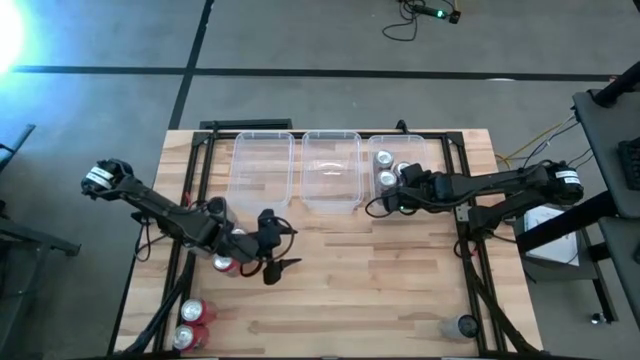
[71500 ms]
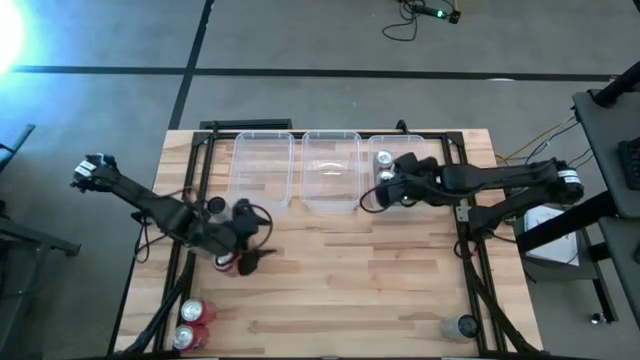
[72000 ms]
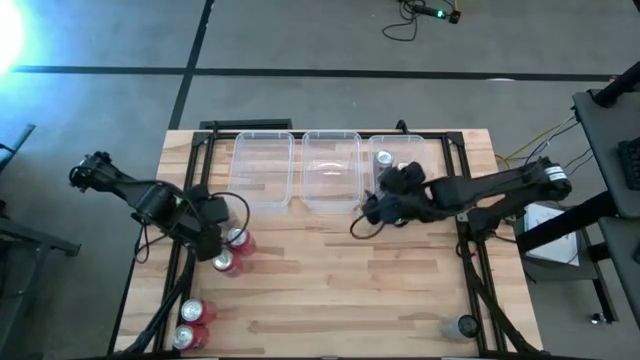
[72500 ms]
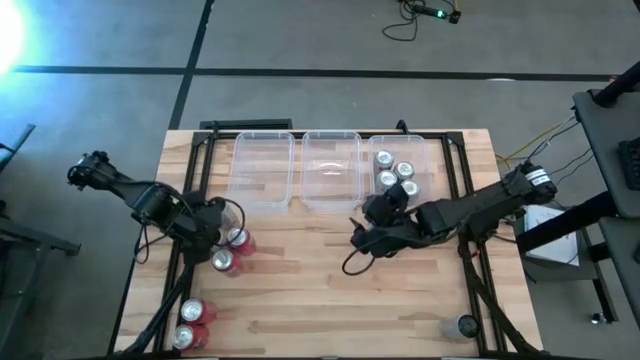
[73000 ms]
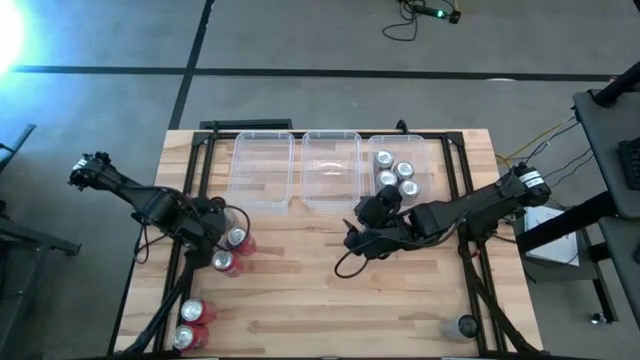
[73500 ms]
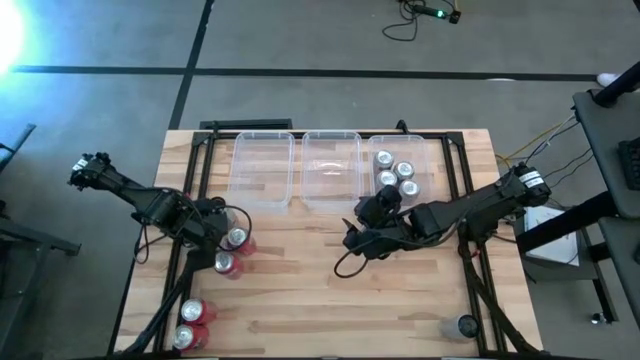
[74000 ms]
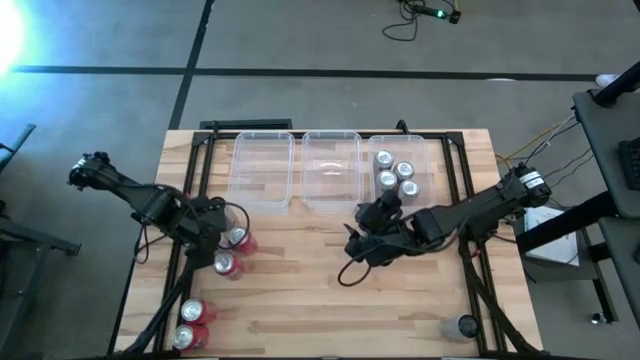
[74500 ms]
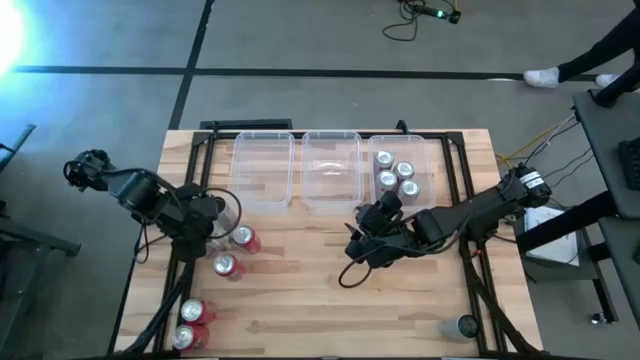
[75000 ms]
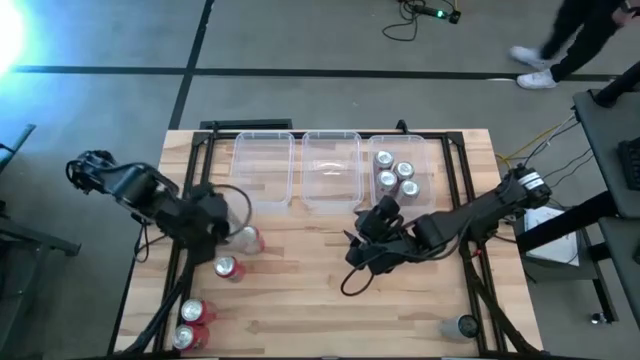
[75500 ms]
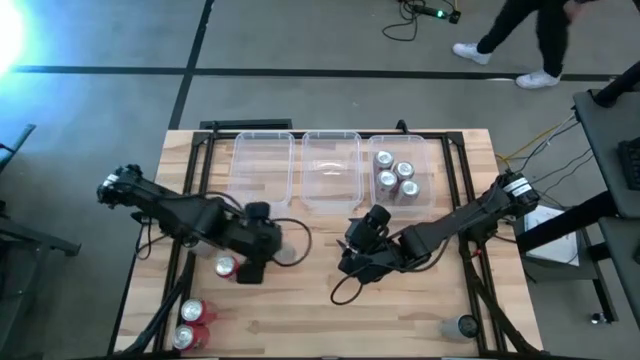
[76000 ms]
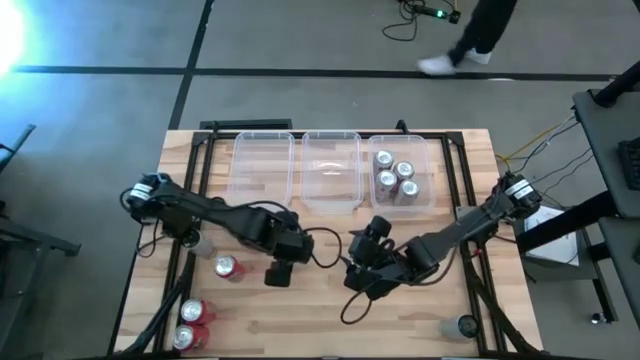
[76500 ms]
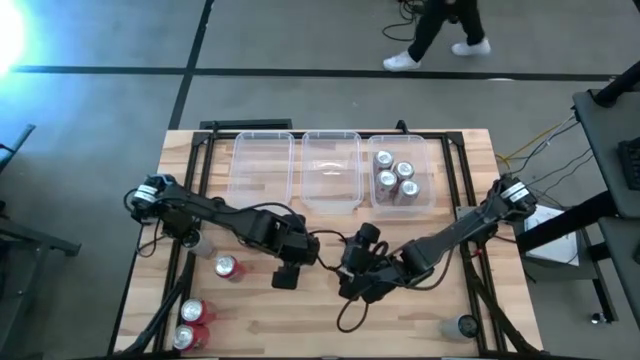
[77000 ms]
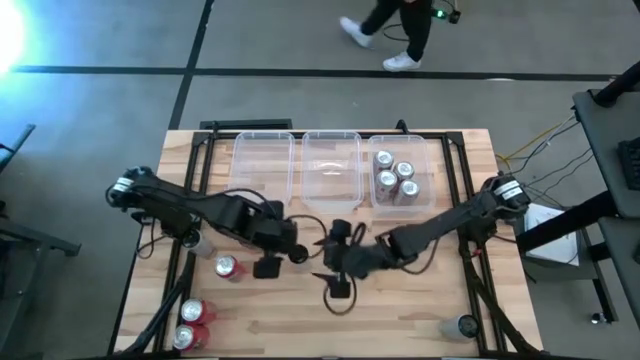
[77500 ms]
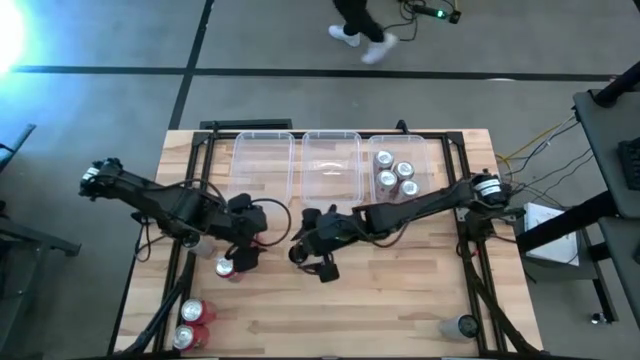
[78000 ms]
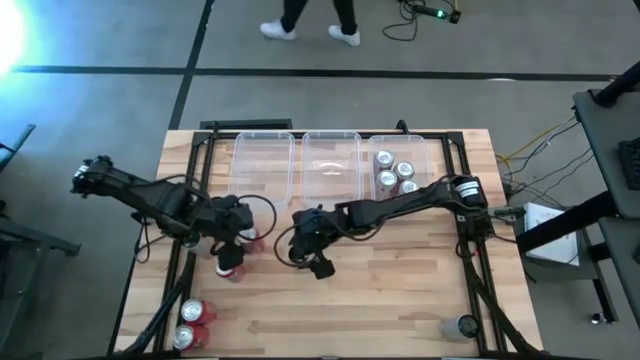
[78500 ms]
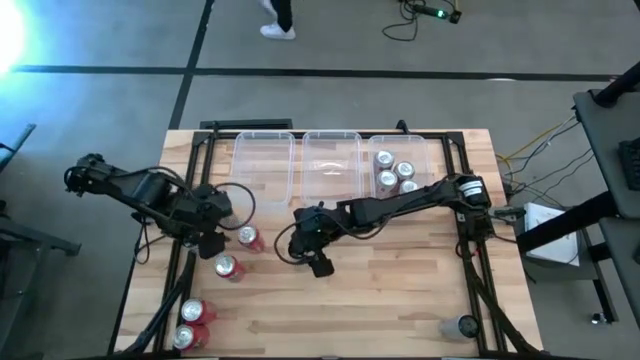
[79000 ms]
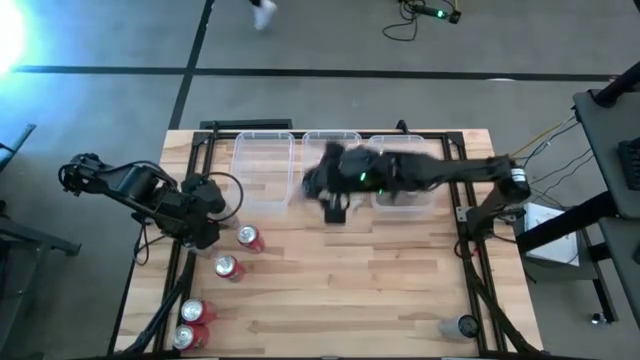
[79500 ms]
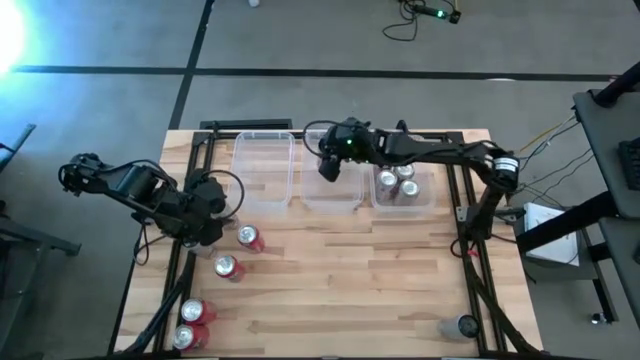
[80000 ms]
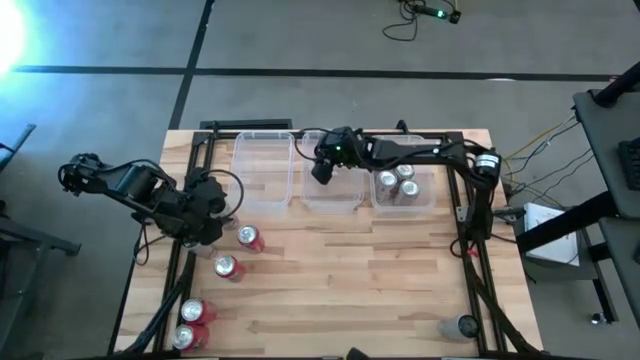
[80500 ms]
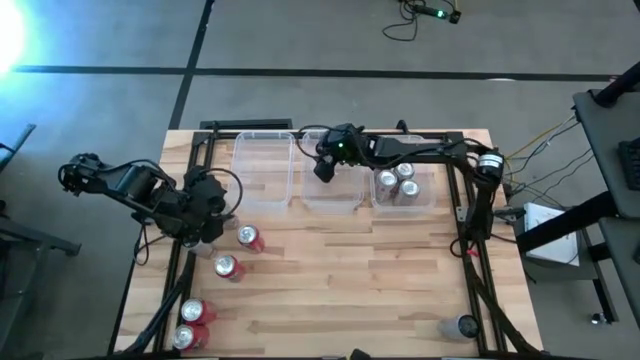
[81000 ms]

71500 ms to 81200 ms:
Task: Sort soda cans
Put the white-pink soda can into the middle transparent bin

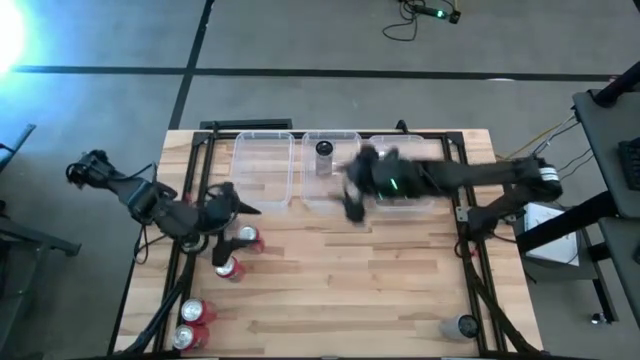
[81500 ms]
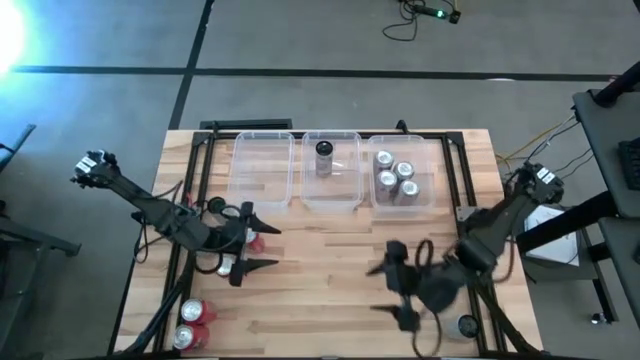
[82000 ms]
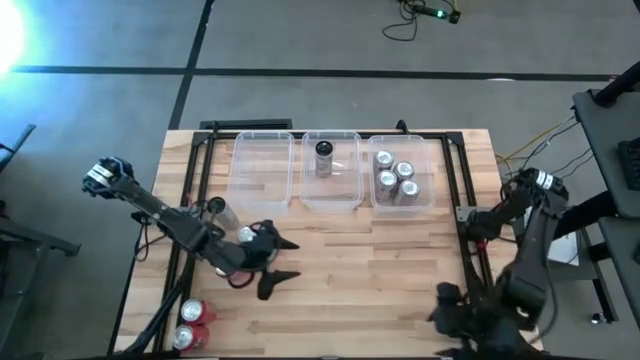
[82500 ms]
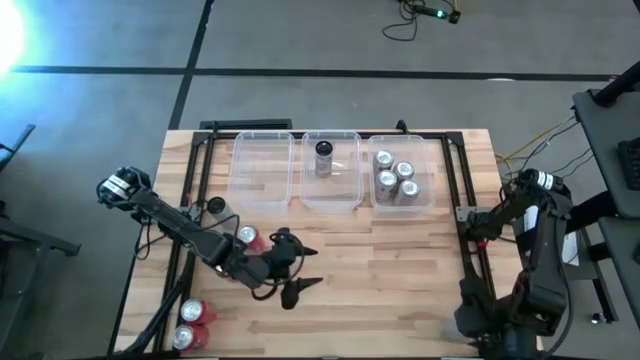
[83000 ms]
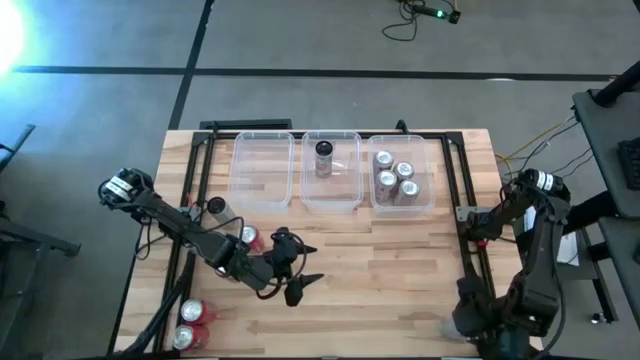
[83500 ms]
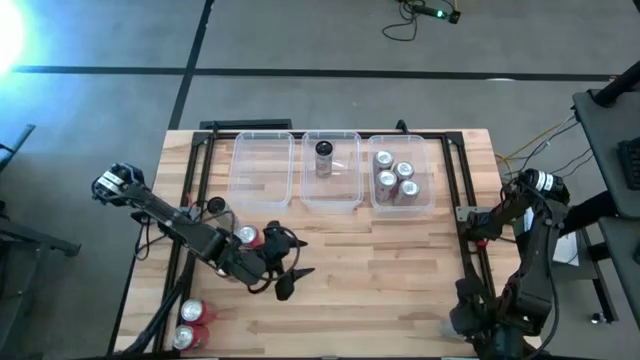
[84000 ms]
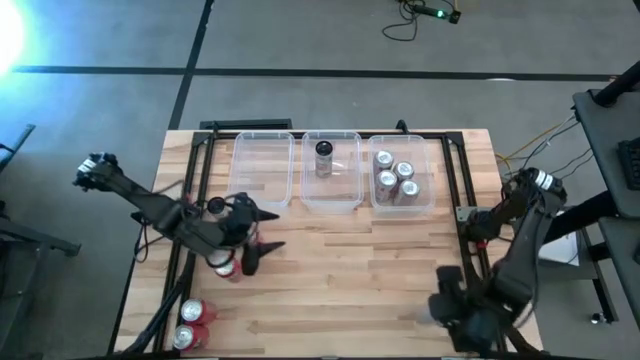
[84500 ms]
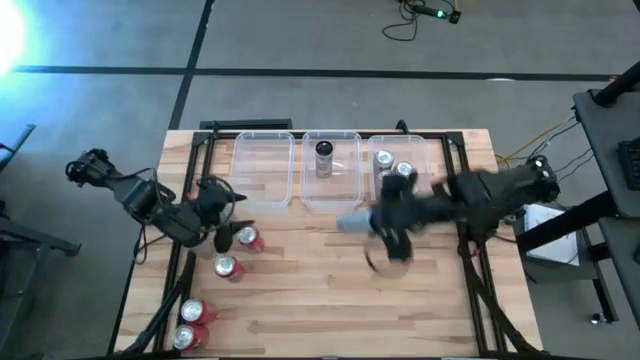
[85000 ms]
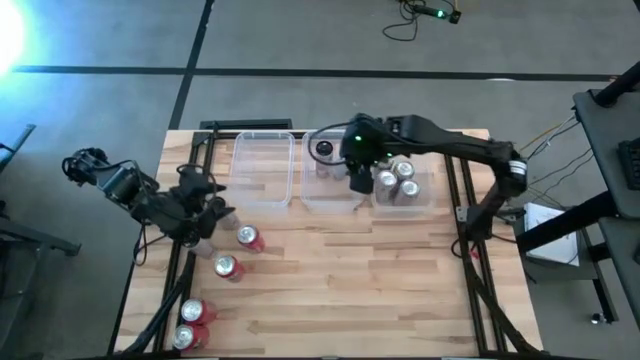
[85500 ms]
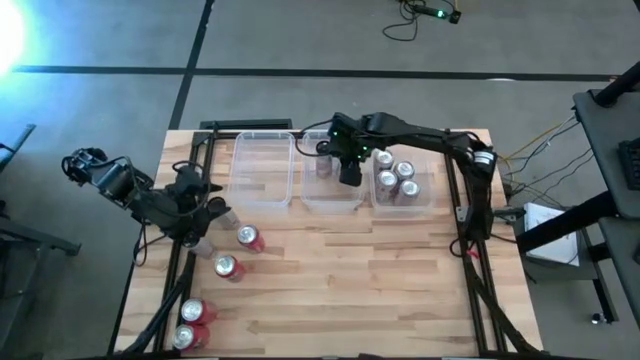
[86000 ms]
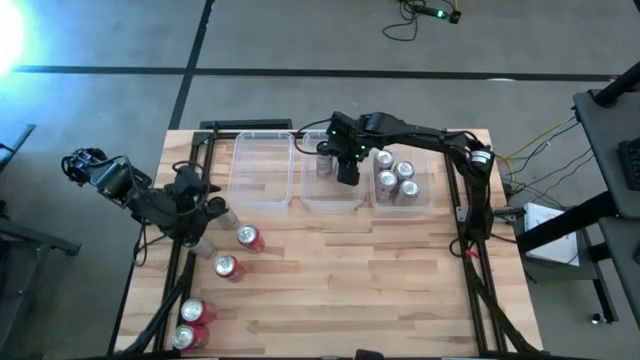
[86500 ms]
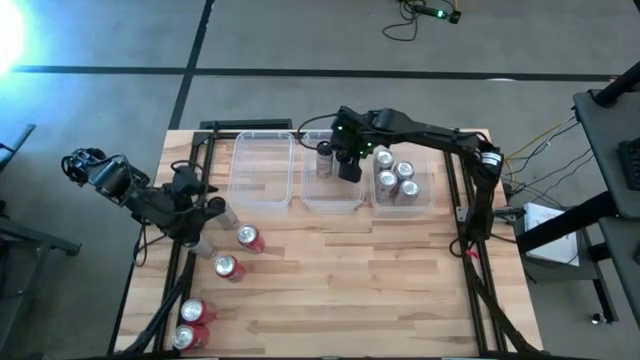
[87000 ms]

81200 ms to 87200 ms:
Put the white-pink soda can into the middle transparent bin

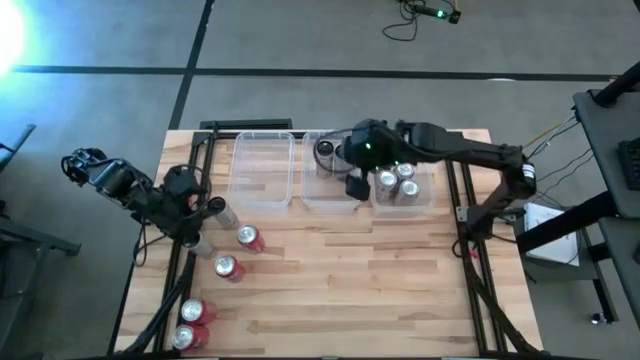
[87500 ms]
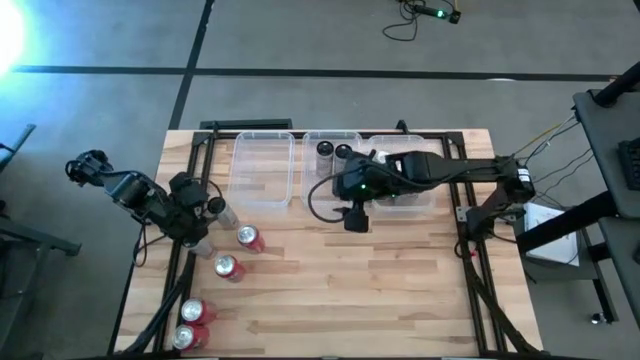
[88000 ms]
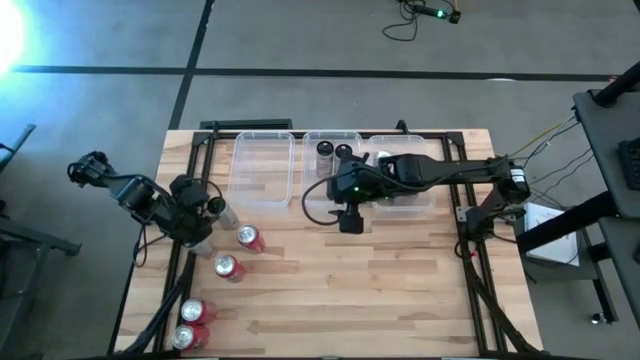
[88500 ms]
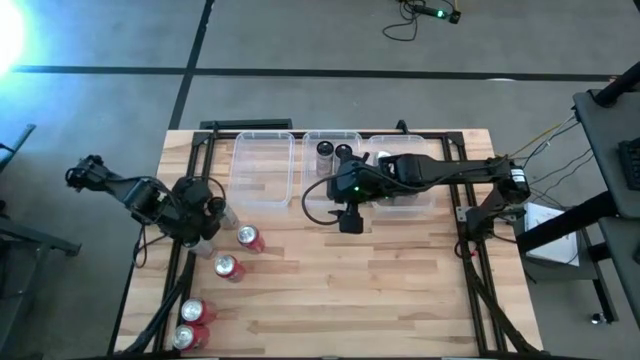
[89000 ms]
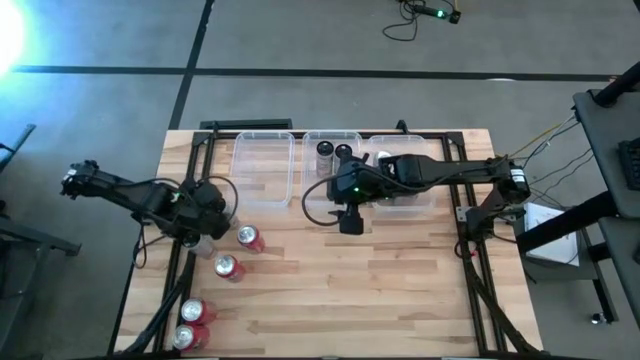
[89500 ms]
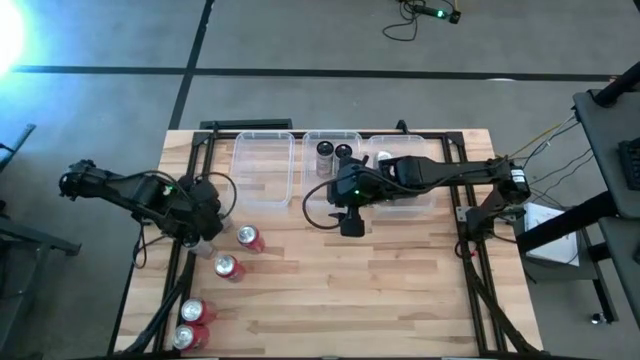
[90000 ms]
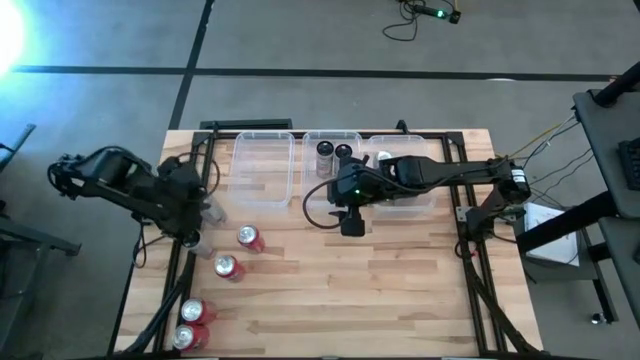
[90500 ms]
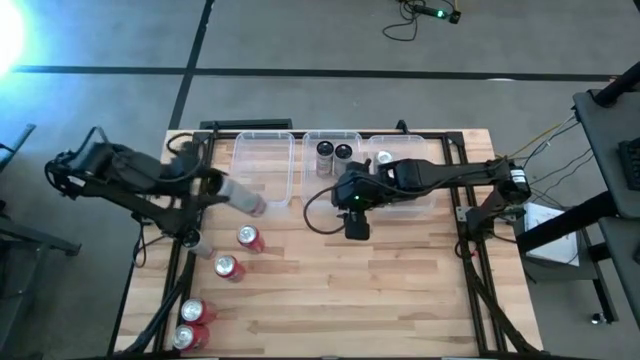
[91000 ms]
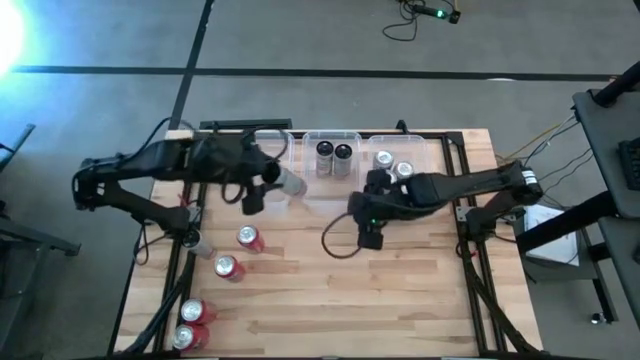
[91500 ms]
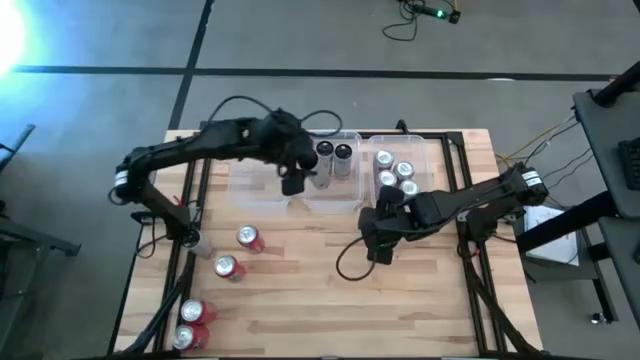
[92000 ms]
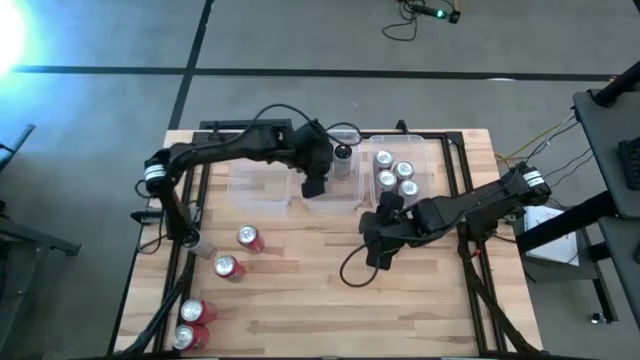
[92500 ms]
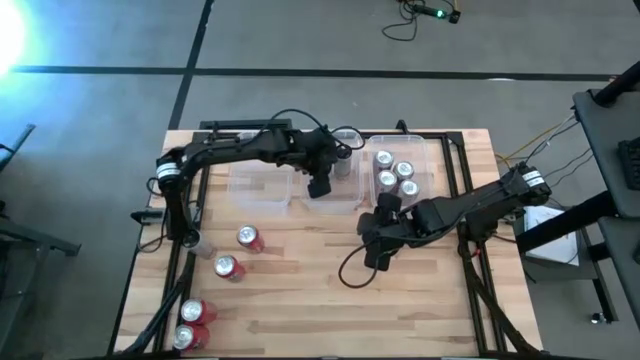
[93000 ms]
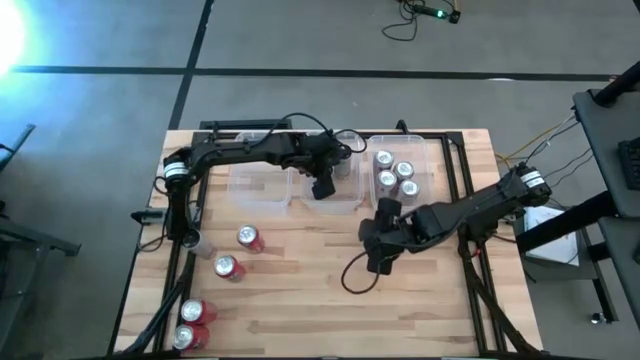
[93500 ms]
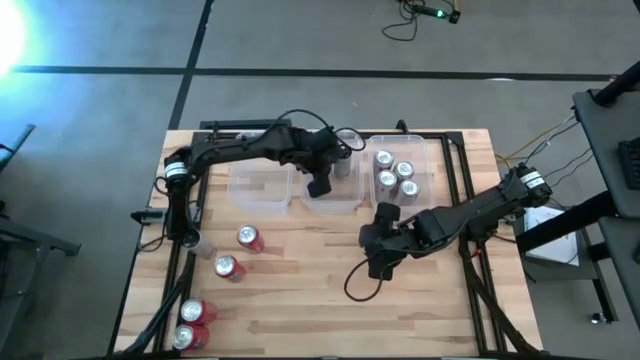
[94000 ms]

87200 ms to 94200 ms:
Put the white-pink soda can into the middle transparent bin
